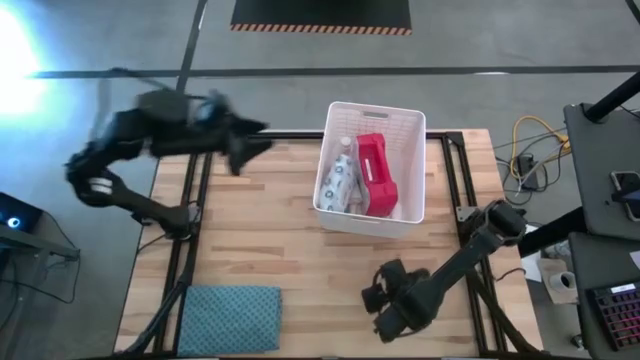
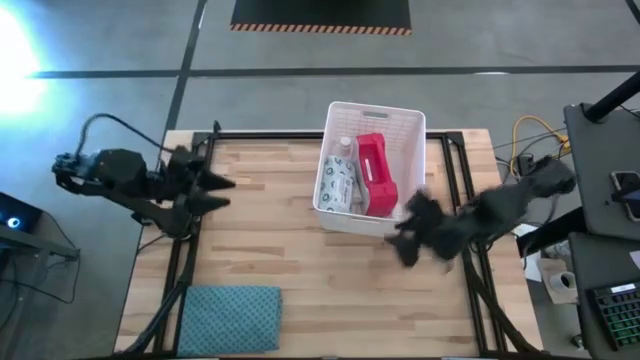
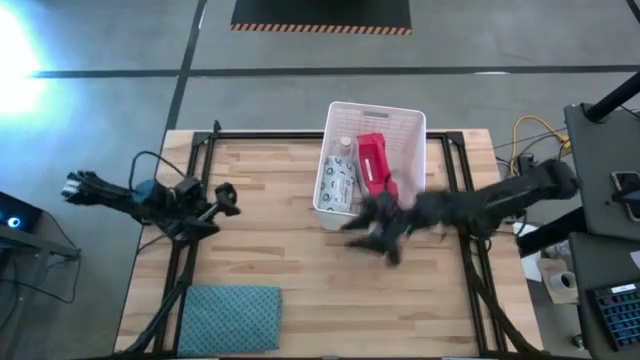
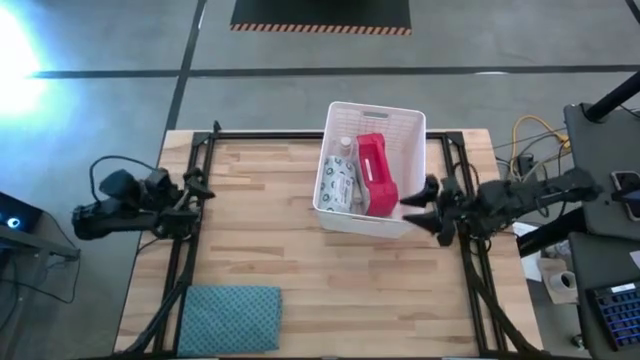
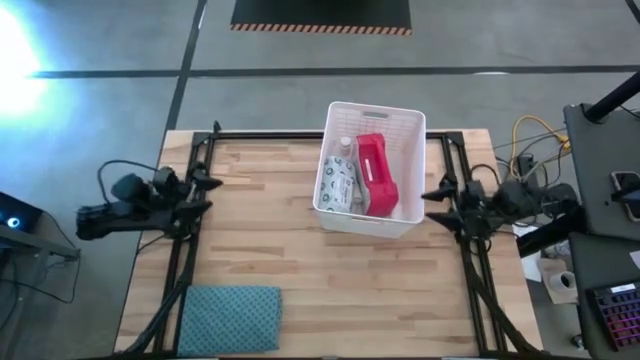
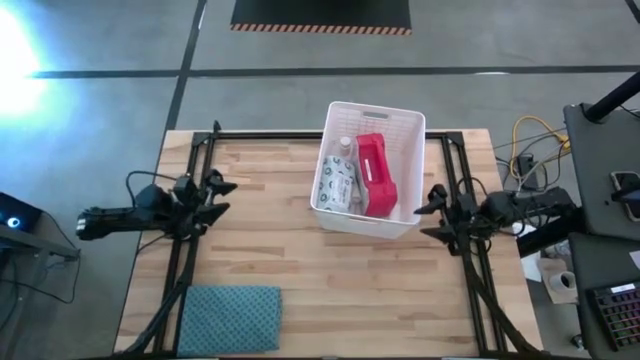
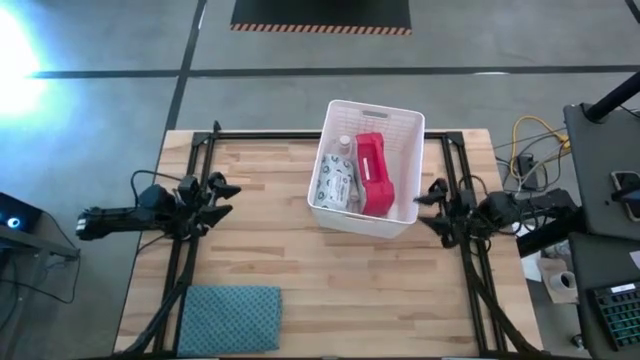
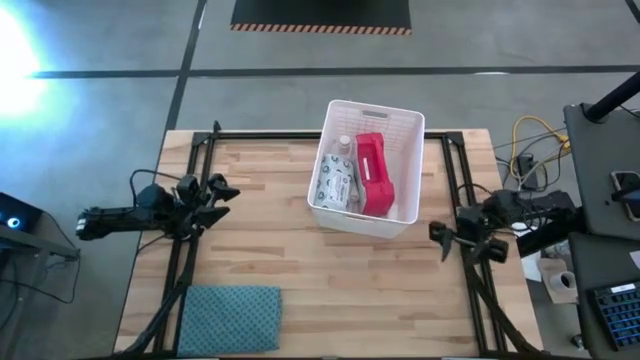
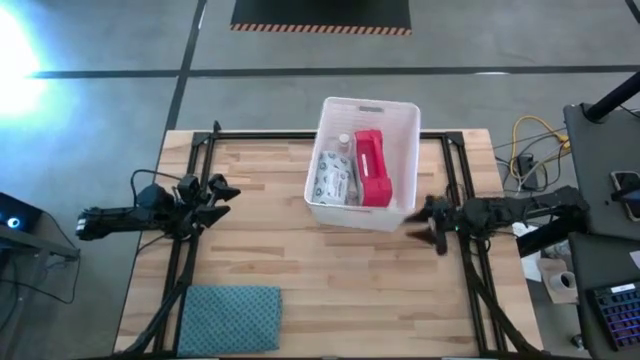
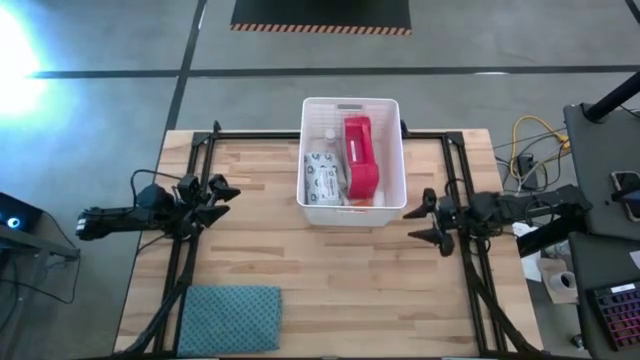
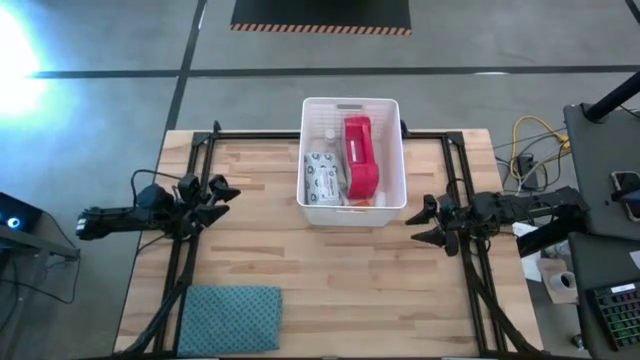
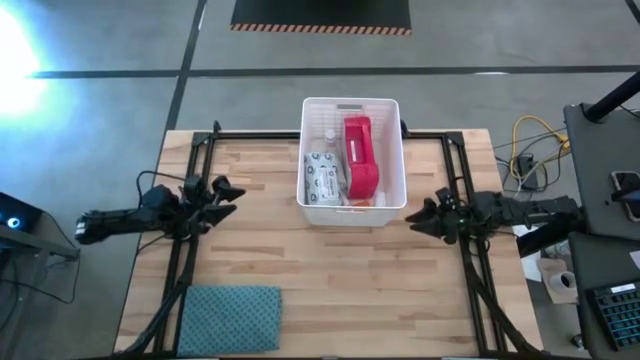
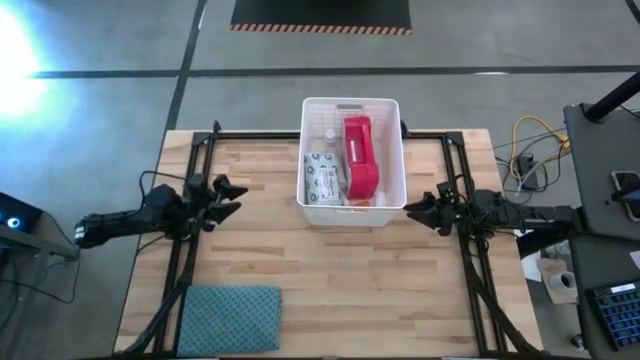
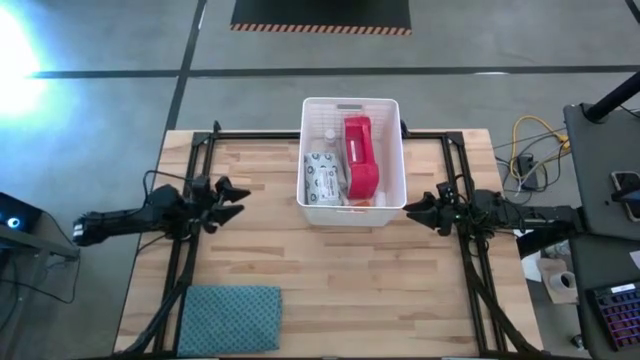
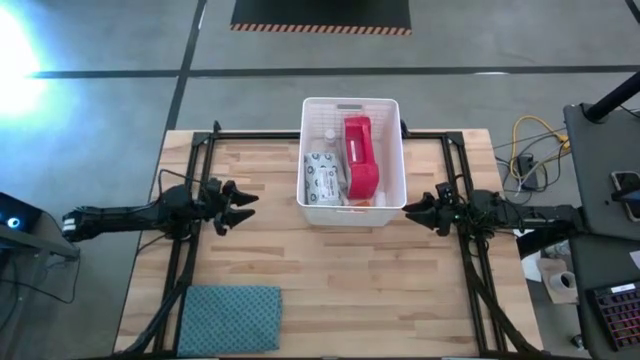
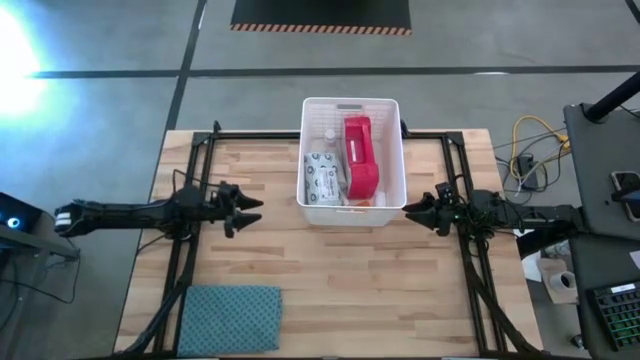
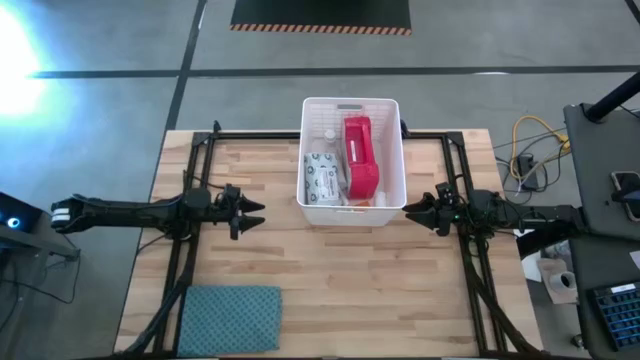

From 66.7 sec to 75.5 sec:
Task: Pick & place medical supplies in basket/bin
Return to Home Position

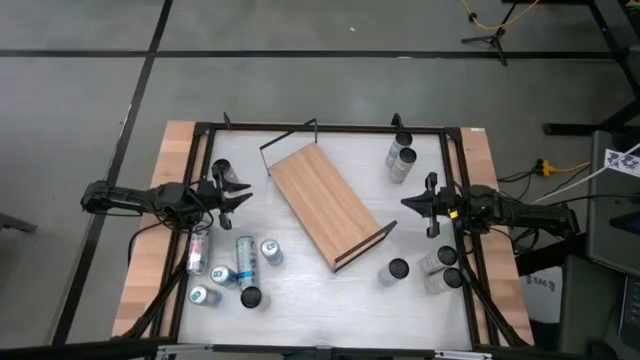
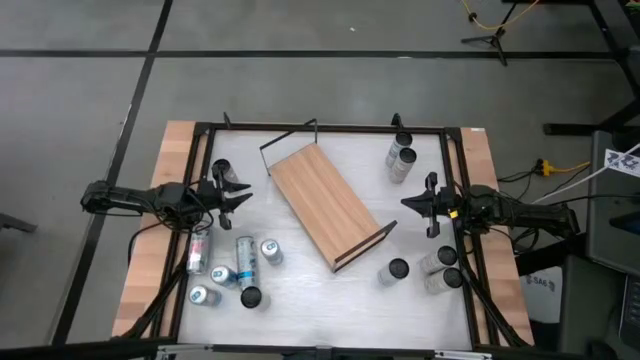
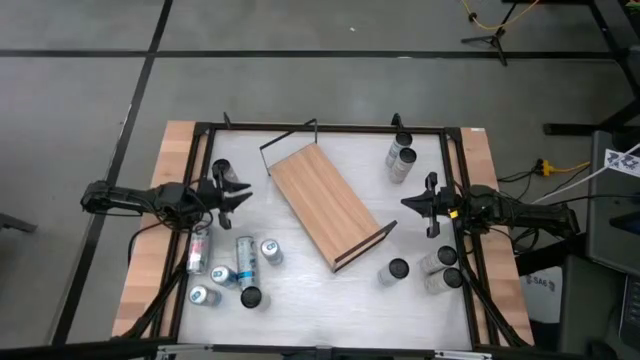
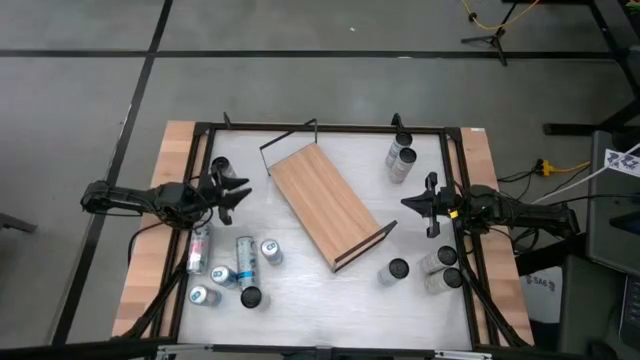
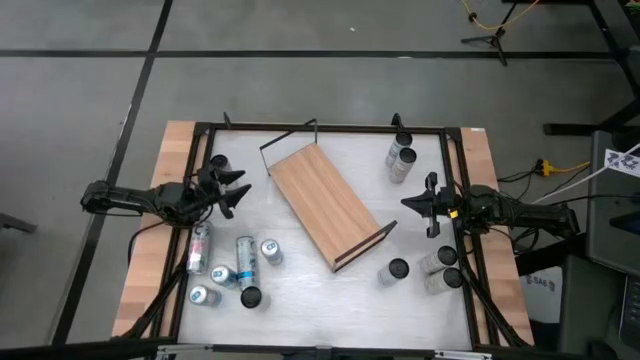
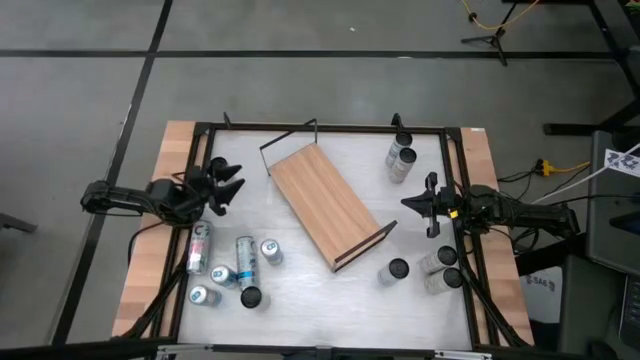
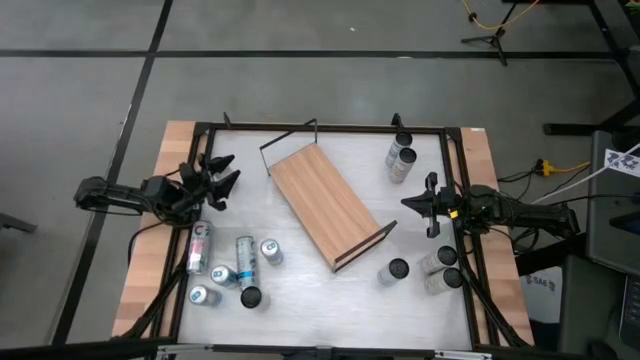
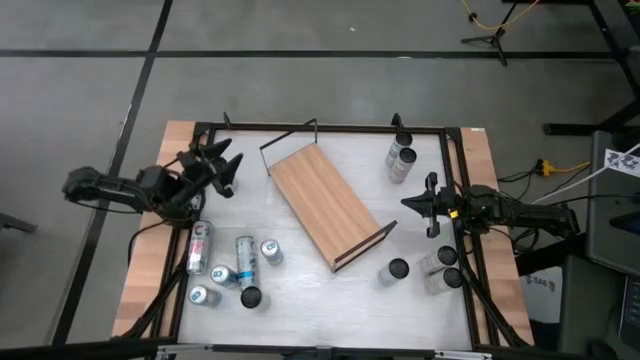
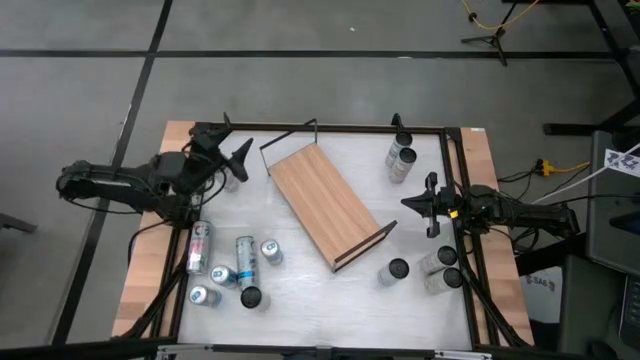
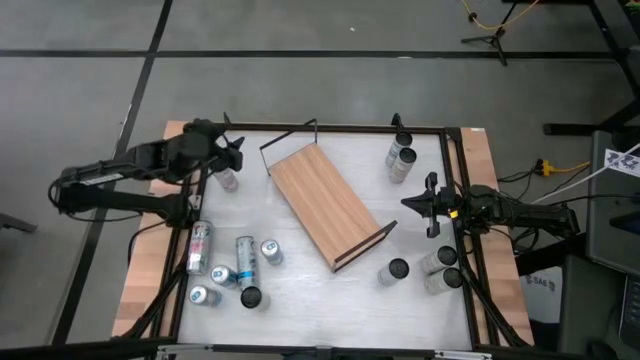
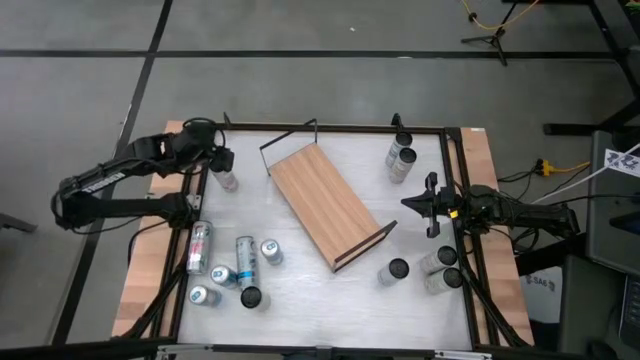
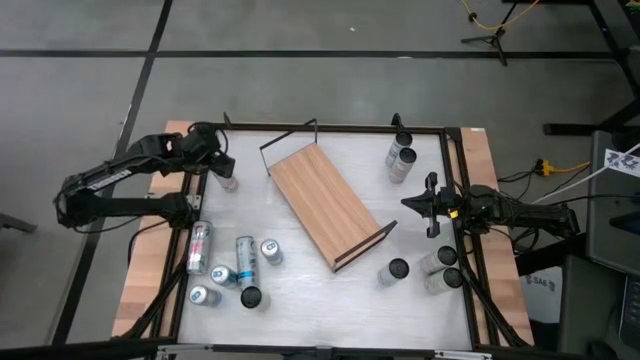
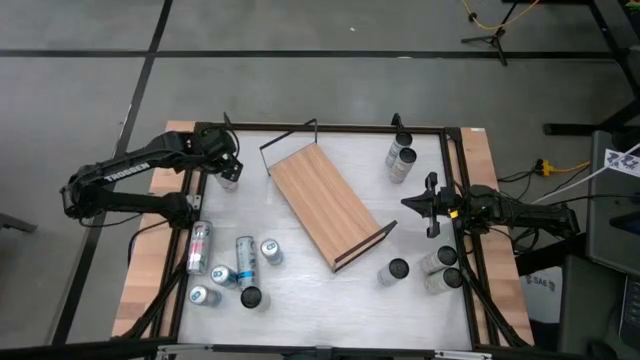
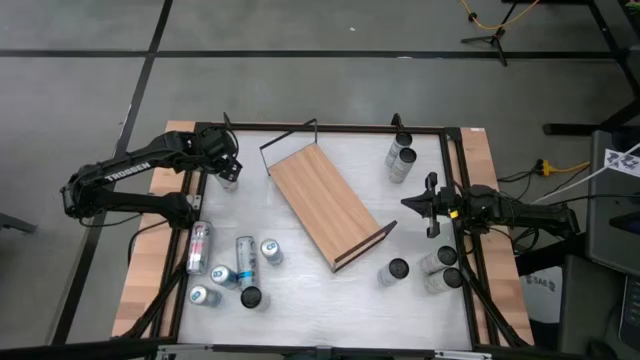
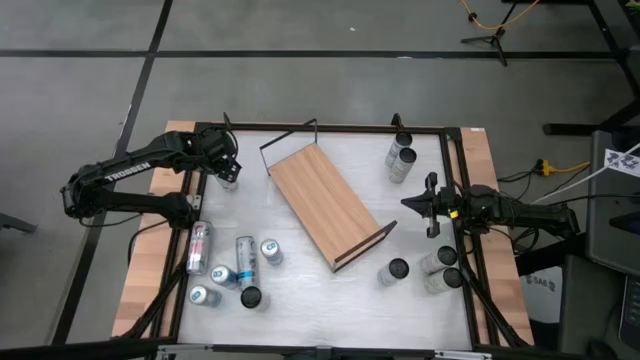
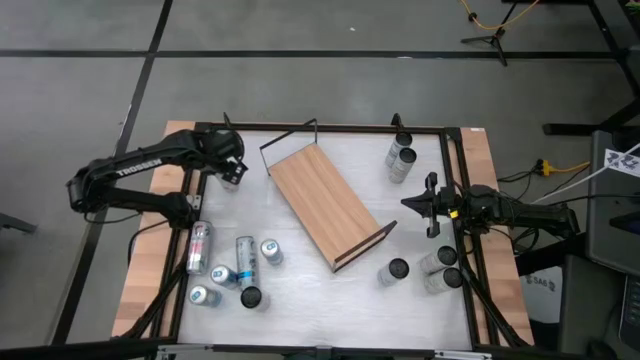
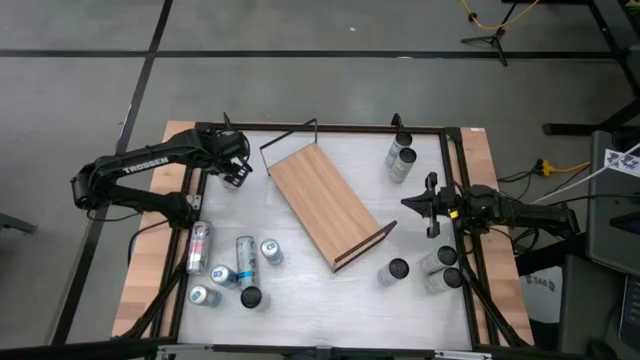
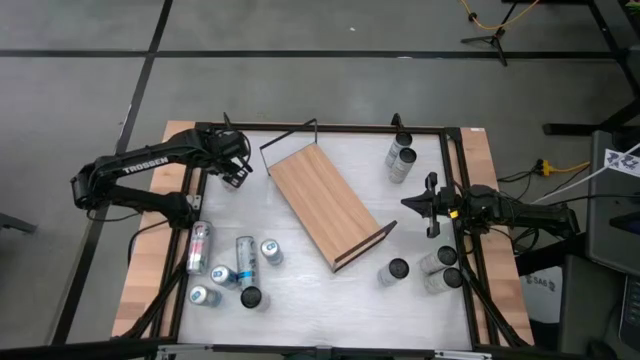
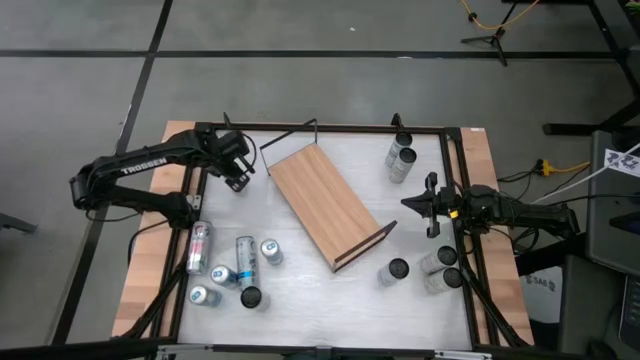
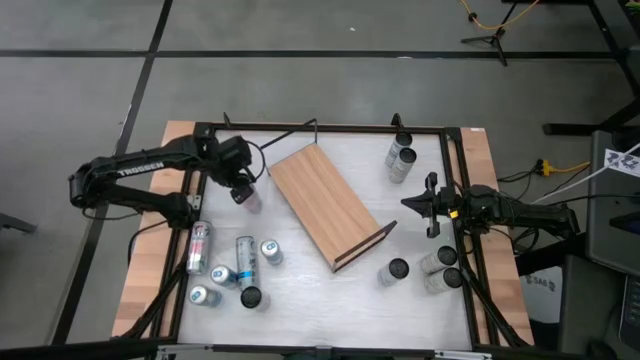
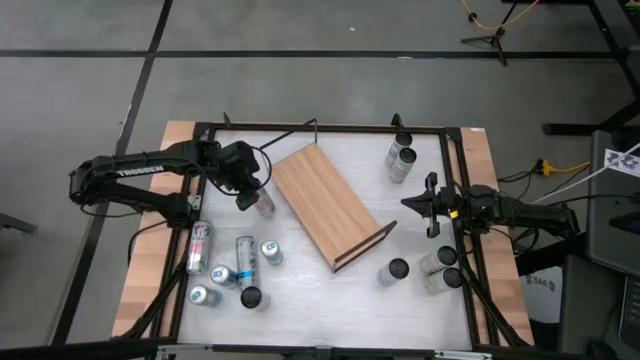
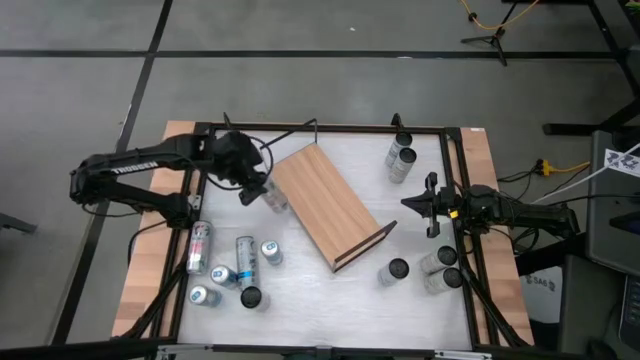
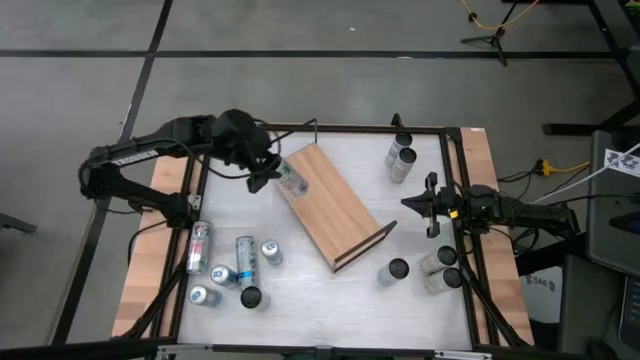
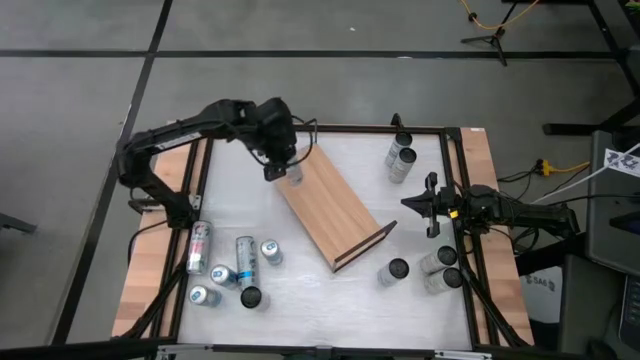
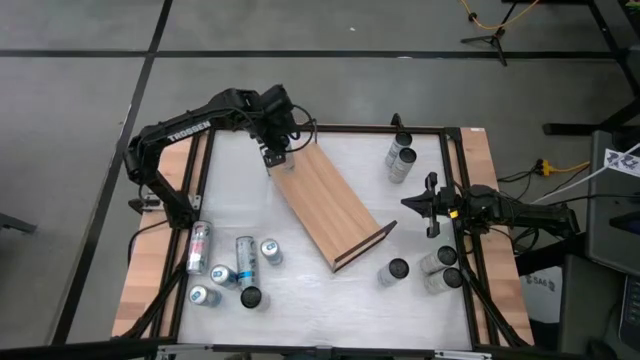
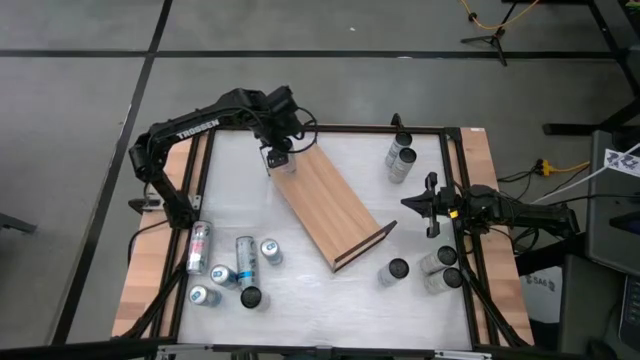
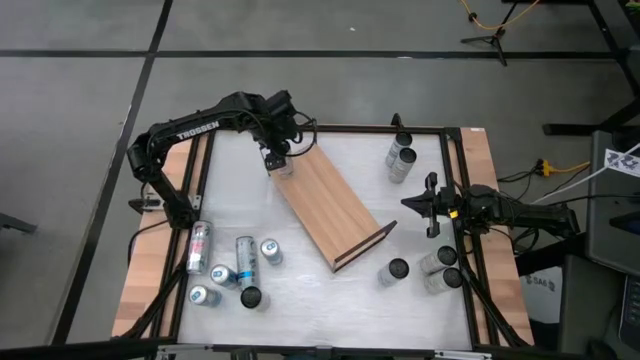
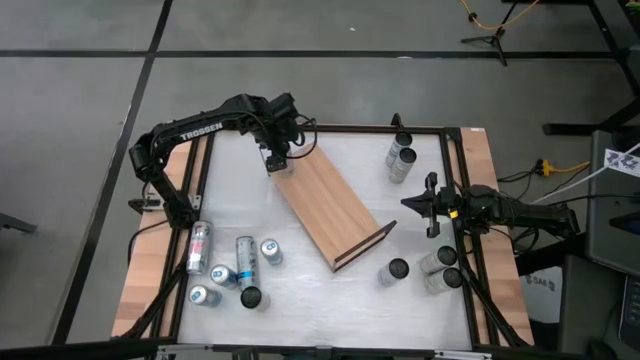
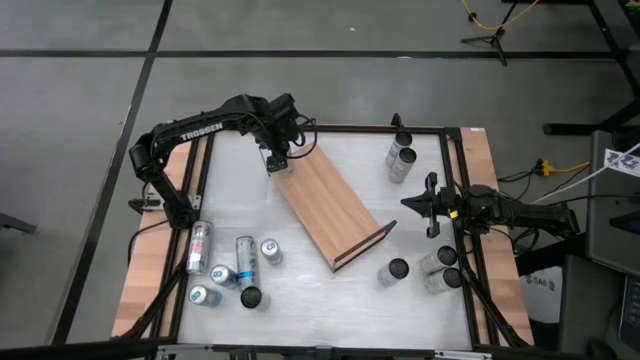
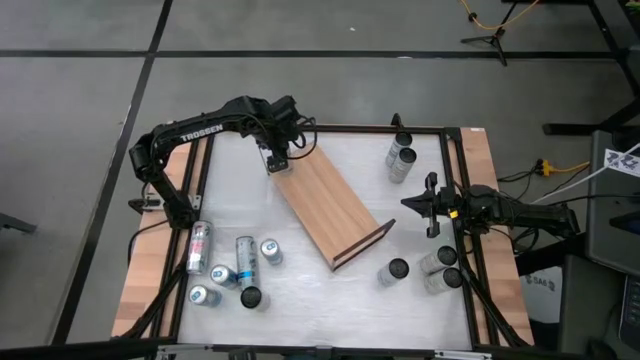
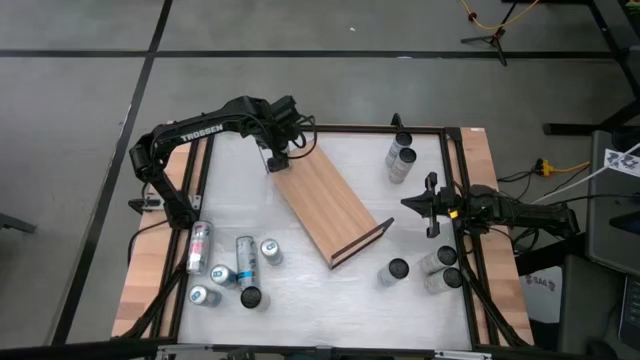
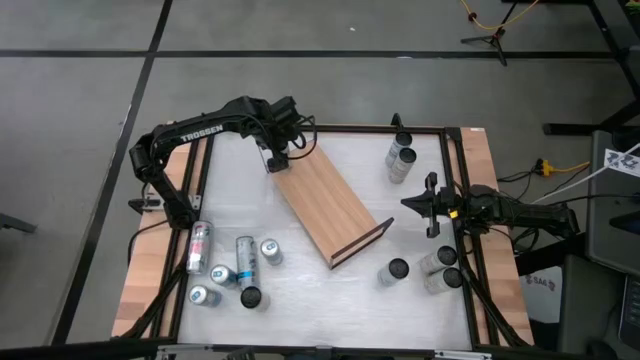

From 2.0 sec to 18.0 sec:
Task: Place canned beverage on shelf
Put the top white-pink soda can on the shelf
